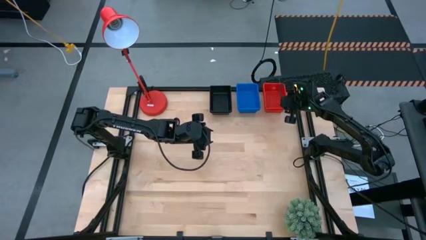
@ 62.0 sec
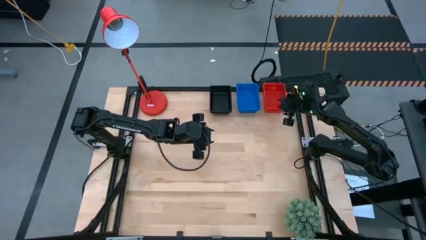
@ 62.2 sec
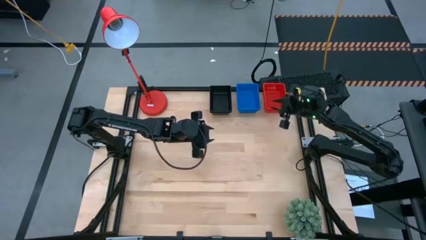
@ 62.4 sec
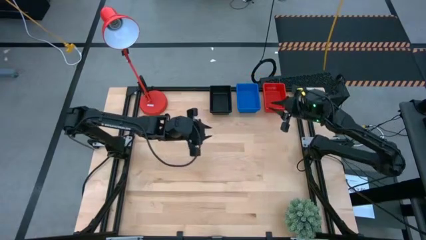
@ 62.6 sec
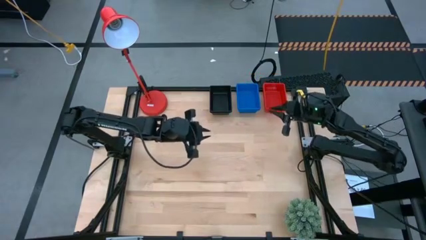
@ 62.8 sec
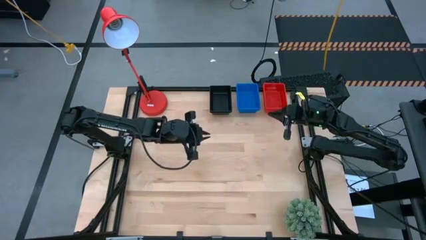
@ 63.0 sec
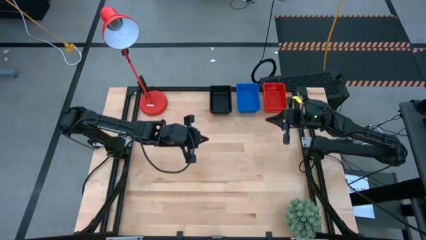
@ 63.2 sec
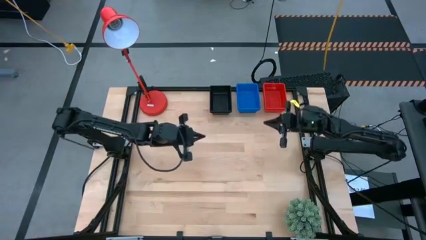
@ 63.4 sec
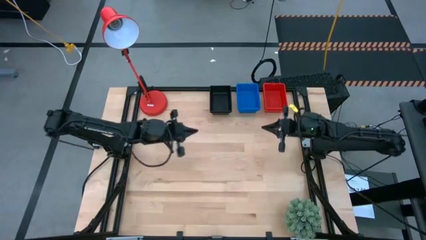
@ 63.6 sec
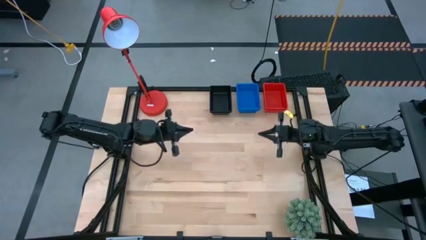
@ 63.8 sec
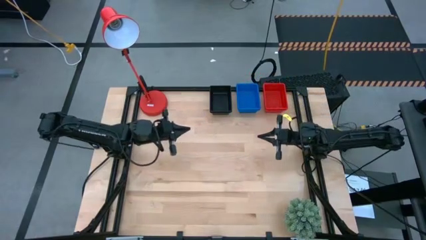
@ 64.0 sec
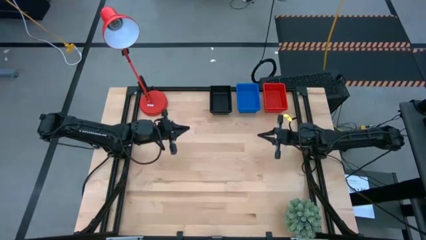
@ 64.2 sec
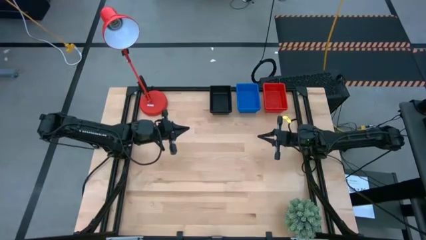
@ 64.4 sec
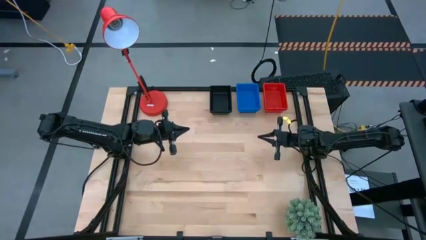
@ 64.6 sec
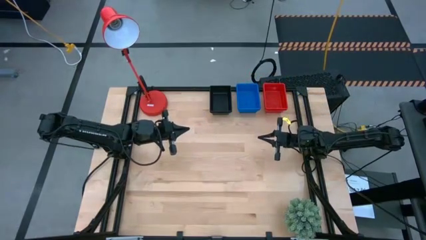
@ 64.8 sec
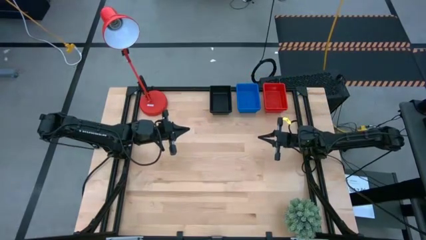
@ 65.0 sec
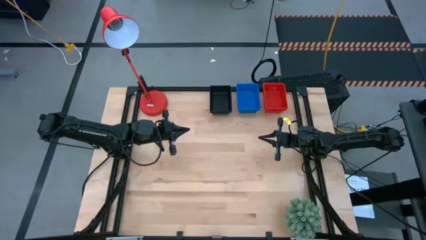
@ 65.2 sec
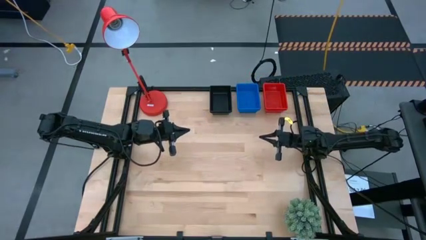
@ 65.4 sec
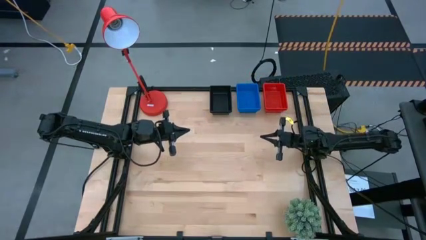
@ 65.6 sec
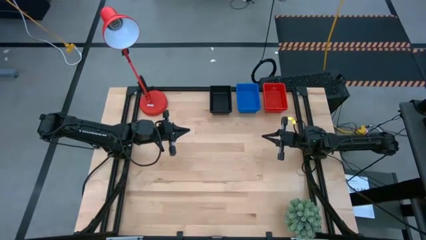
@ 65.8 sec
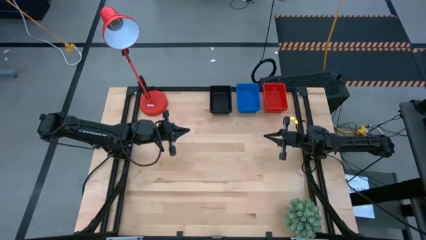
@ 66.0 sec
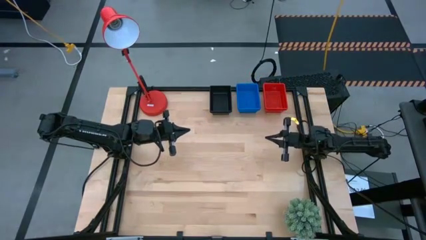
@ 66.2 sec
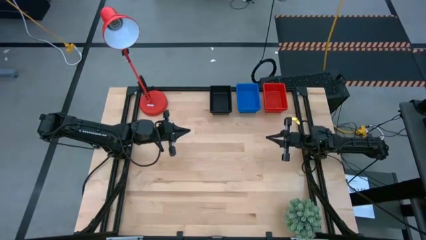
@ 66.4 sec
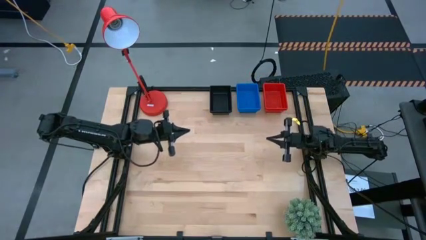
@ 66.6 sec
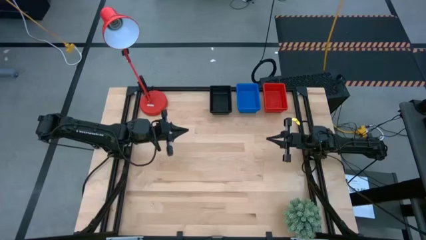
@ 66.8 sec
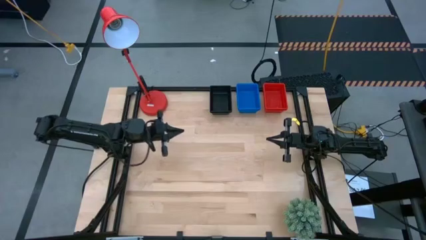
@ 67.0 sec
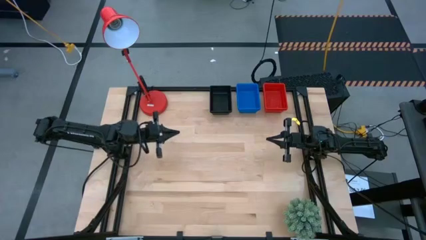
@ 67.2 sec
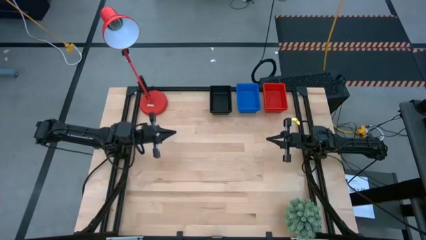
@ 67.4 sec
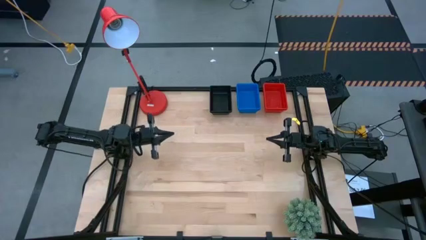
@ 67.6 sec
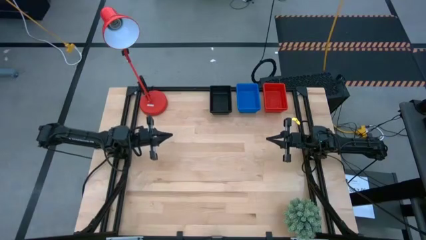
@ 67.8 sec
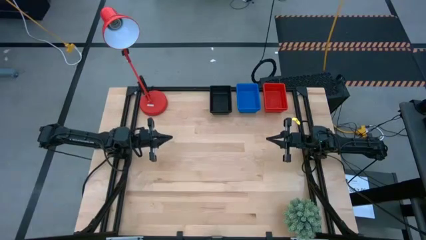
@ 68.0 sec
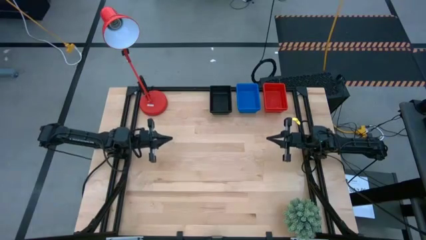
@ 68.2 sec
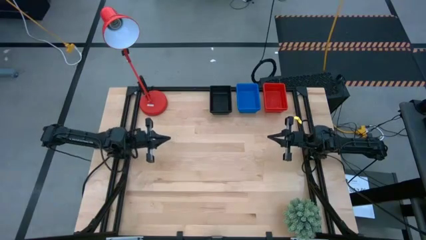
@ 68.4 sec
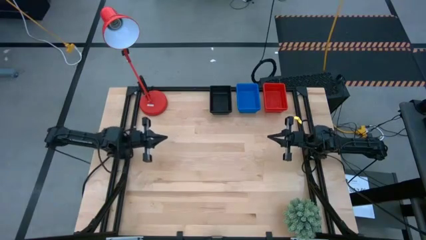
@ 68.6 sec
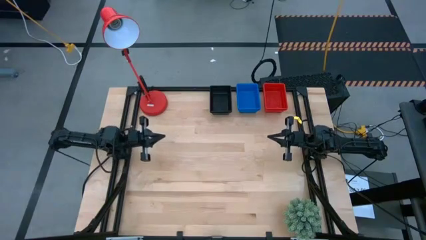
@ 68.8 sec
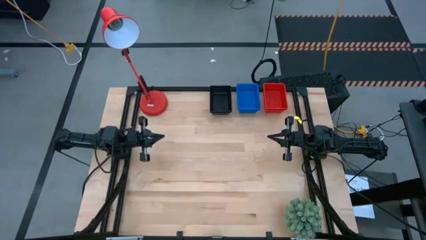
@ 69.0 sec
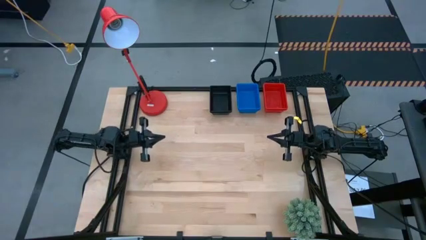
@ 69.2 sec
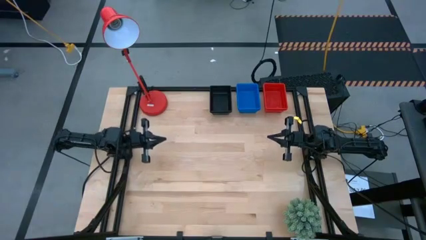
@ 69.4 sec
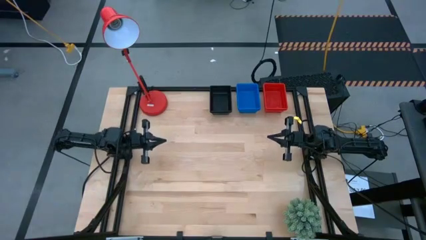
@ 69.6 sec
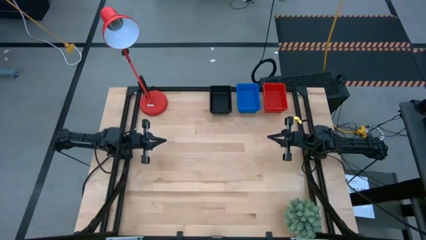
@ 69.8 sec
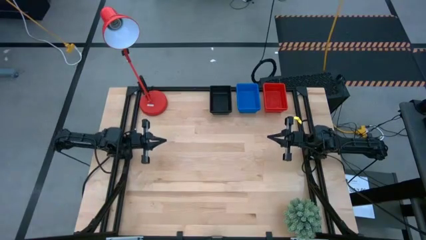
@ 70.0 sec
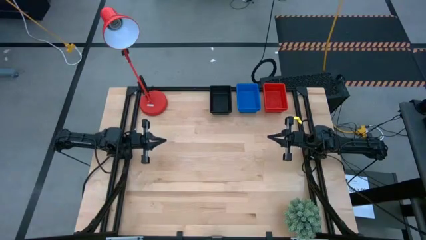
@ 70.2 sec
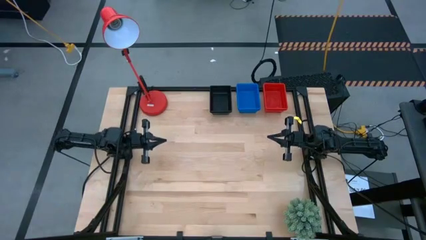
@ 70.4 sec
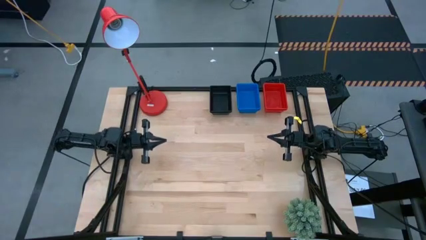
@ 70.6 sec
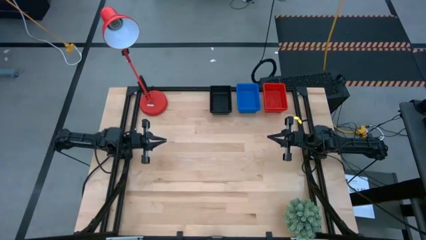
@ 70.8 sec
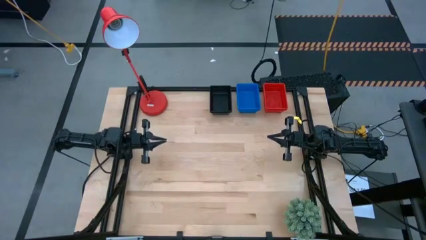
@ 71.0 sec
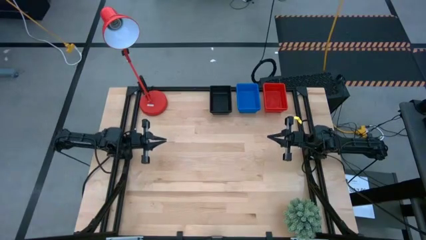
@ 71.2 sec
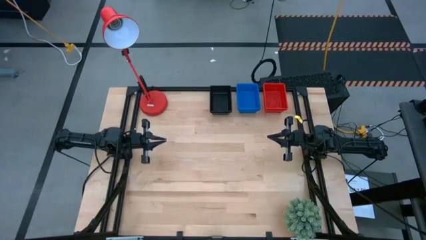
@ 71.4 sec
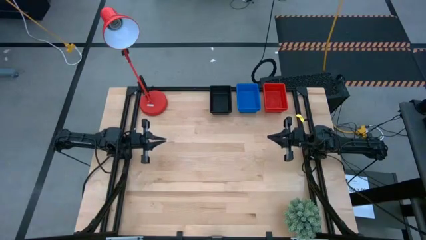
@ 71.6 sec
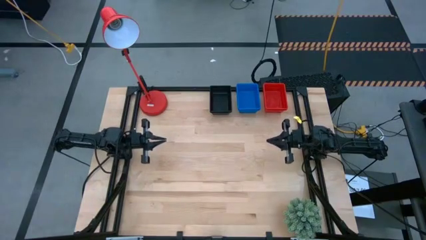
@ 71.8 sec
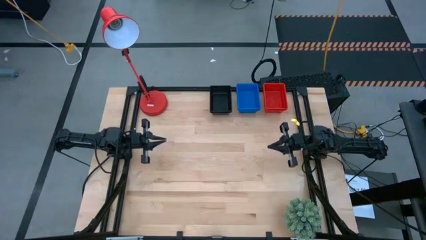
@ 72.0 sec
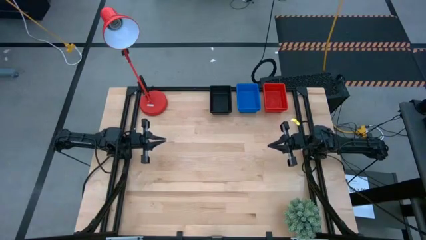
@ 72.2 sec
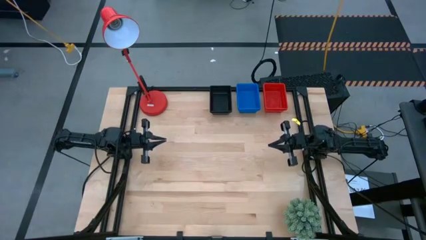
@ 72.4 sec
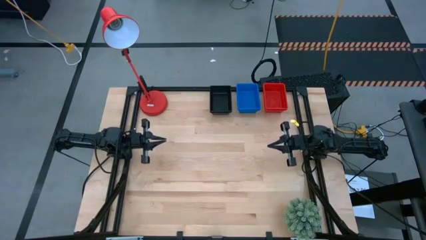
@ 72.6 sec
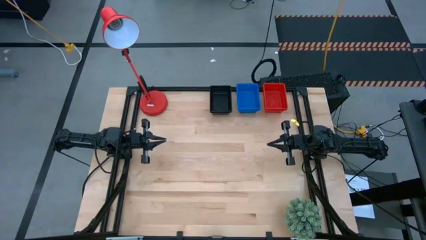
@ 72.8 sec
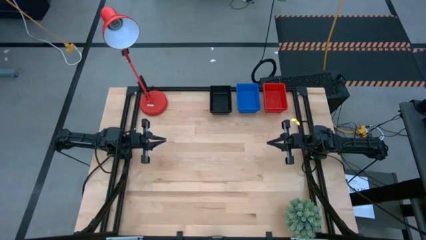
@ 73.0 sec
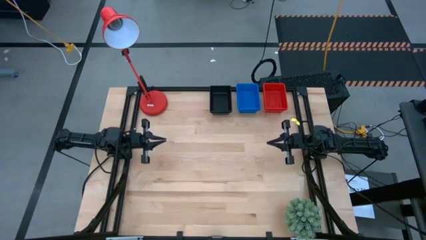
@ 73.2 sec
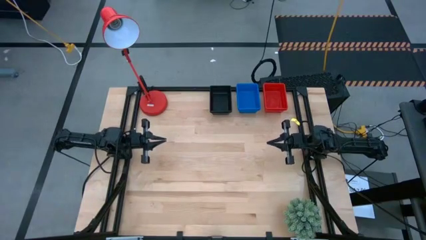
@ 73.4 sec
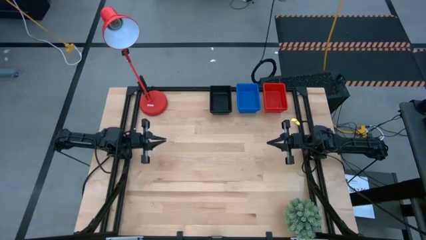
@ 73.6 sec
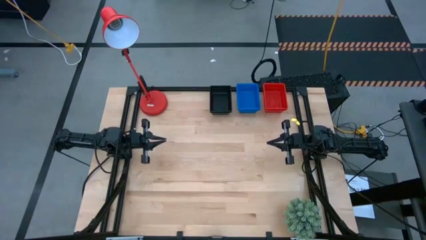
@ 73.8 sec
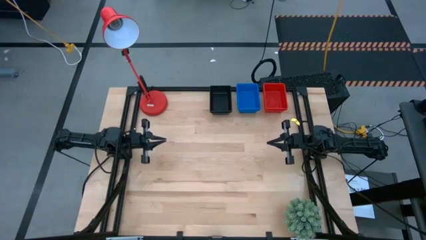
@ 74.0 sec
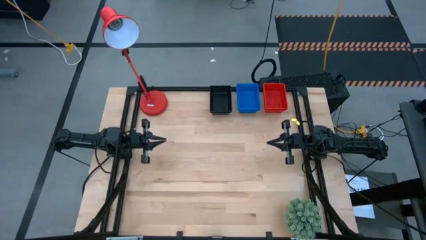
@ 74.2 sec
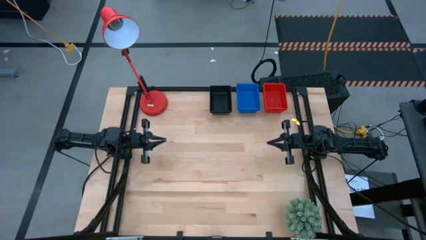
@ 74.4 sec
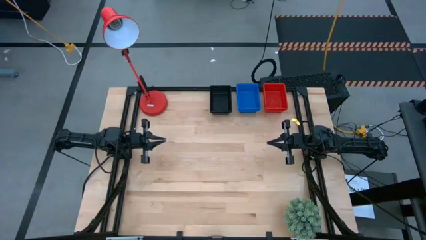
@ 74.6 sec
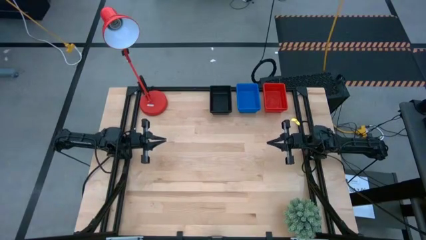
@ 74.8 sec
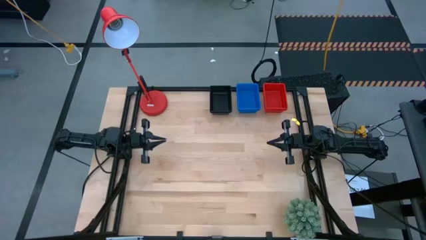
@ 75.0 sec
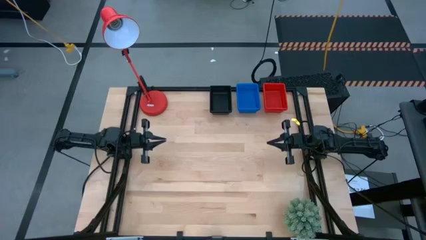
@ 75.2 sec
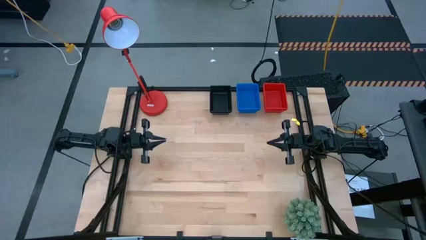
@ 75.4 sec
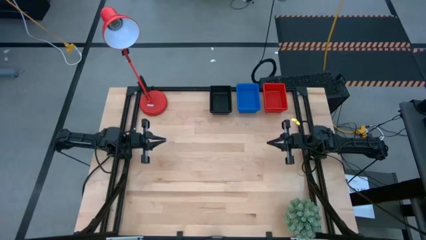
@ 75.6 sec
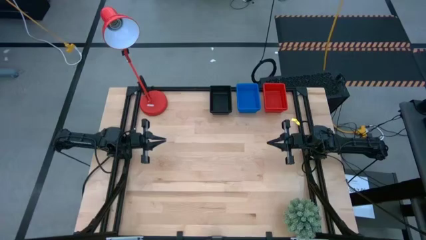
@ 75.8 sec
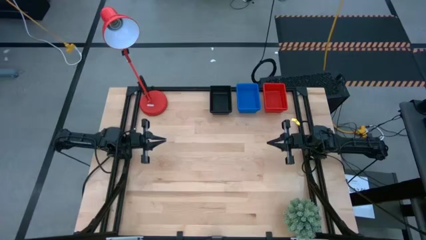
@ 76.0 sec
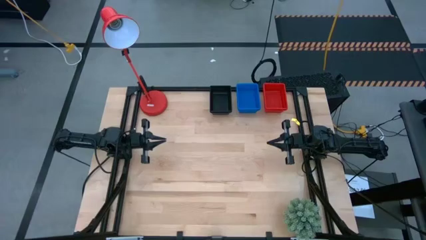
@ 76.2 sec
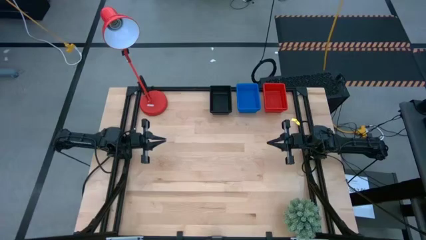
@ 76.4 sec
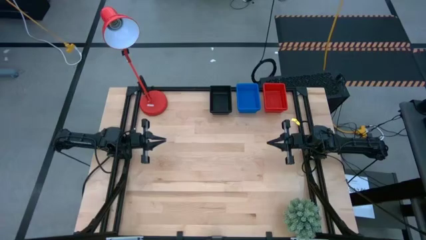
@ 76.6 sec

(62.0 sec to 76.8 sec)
Return to Home Position
